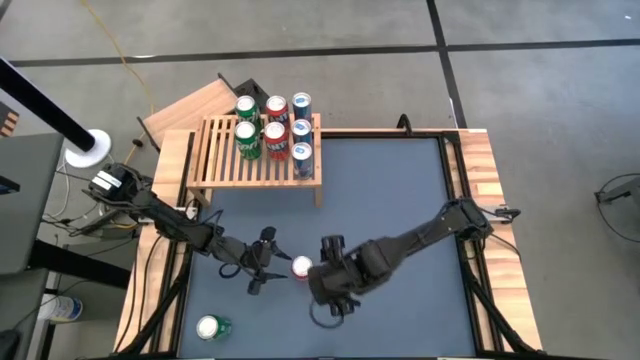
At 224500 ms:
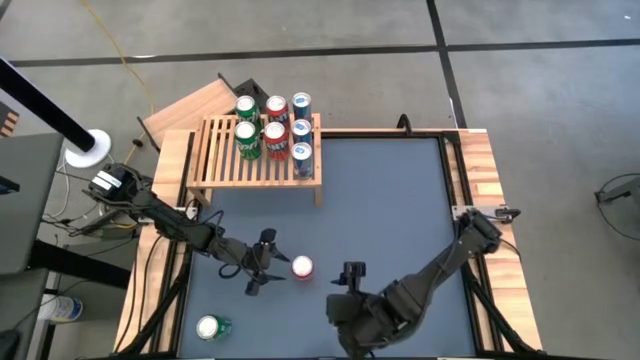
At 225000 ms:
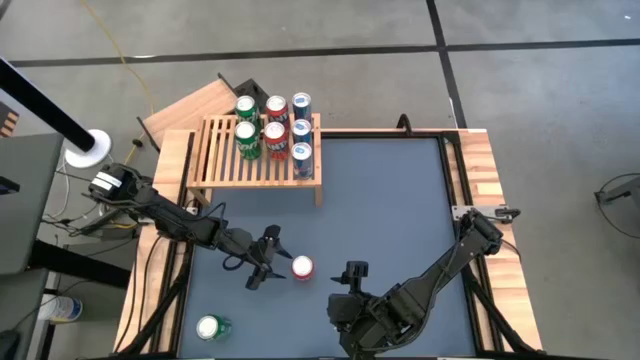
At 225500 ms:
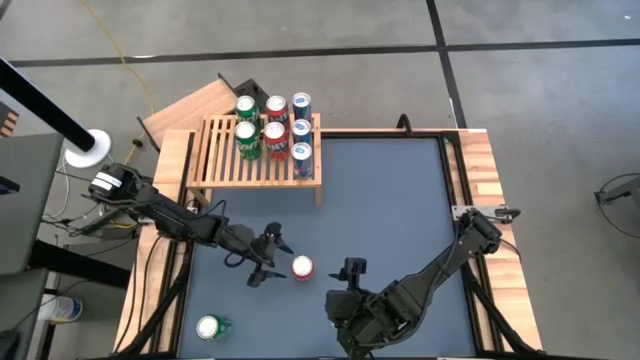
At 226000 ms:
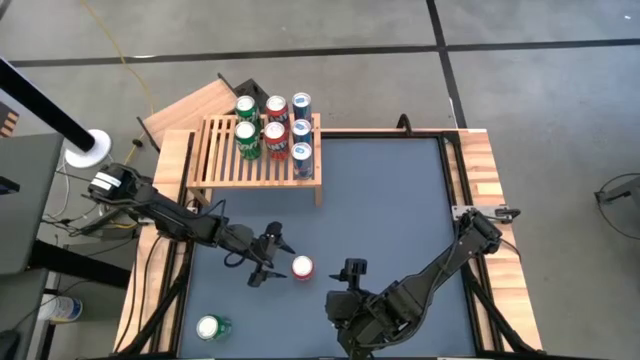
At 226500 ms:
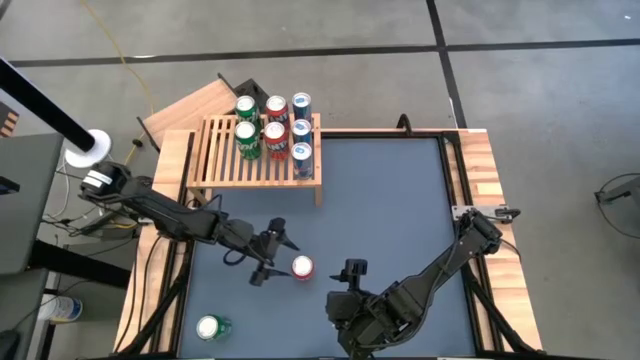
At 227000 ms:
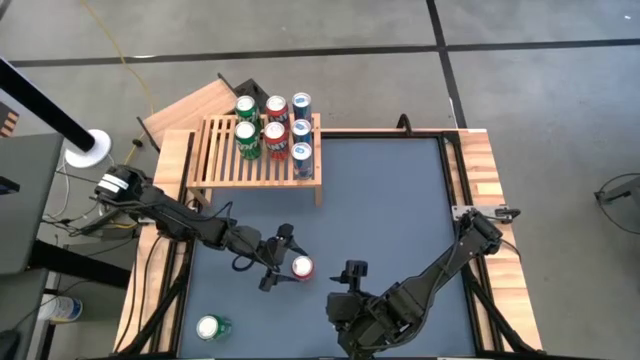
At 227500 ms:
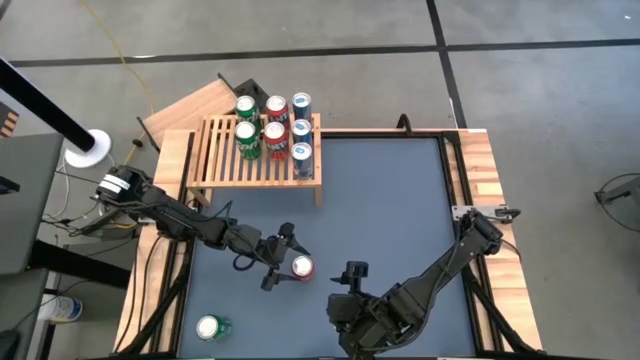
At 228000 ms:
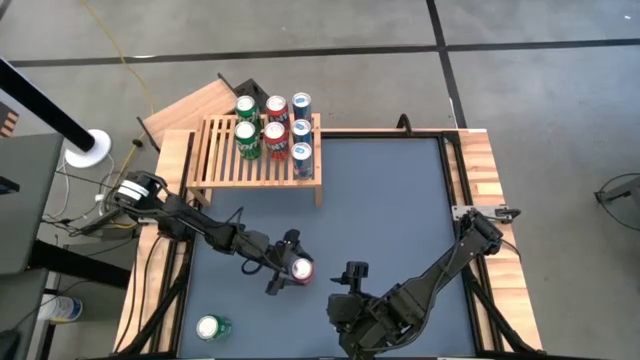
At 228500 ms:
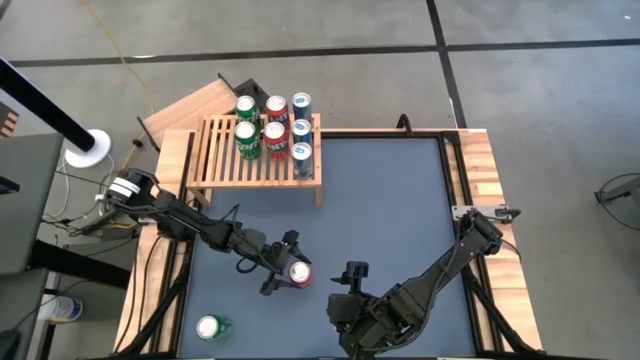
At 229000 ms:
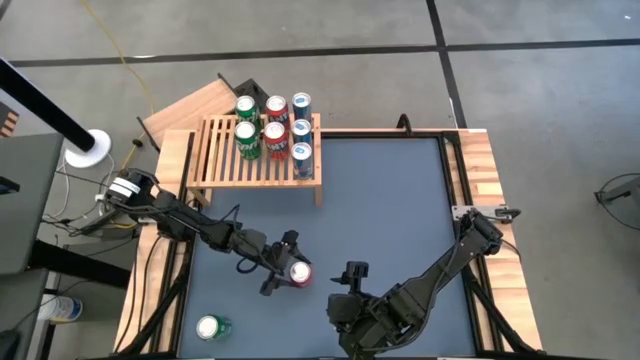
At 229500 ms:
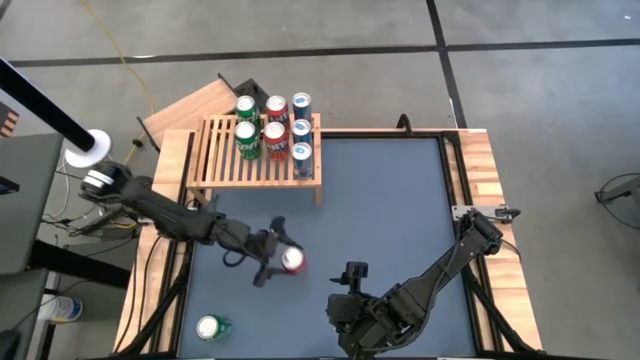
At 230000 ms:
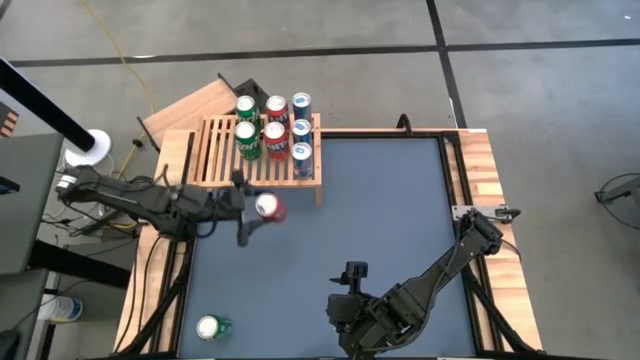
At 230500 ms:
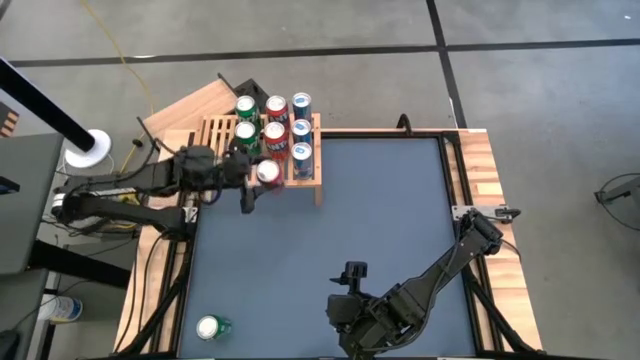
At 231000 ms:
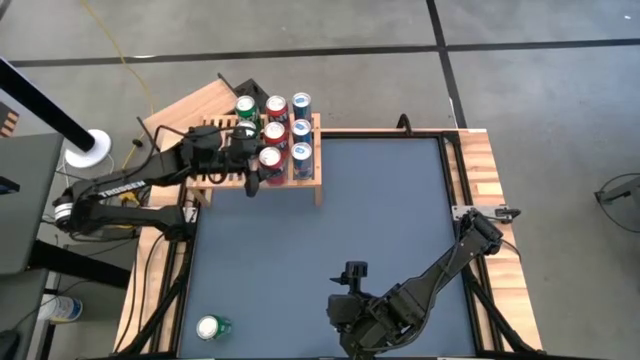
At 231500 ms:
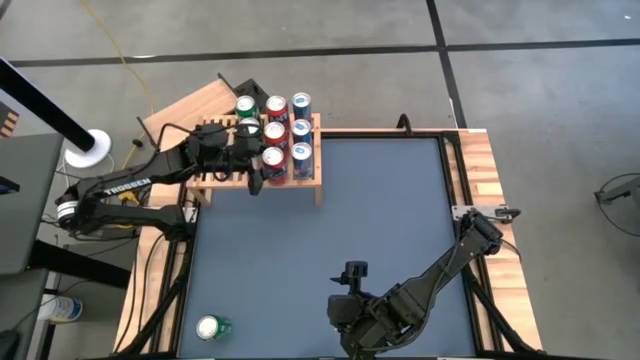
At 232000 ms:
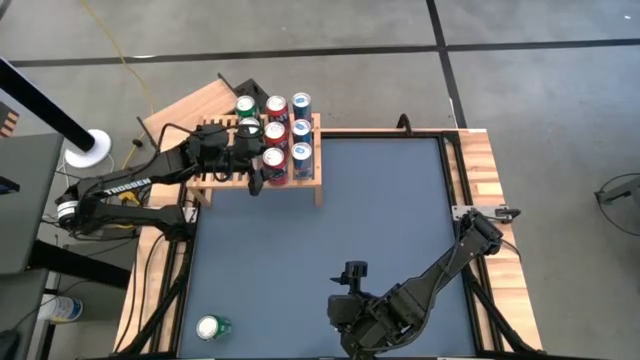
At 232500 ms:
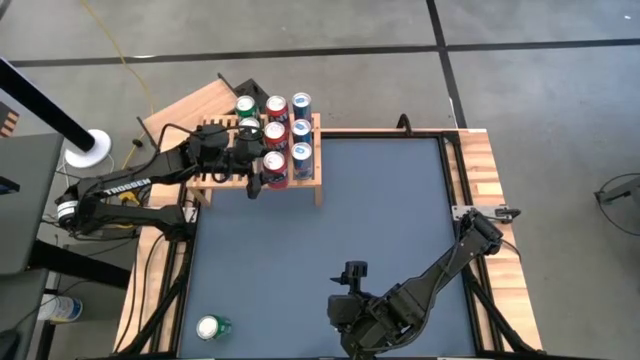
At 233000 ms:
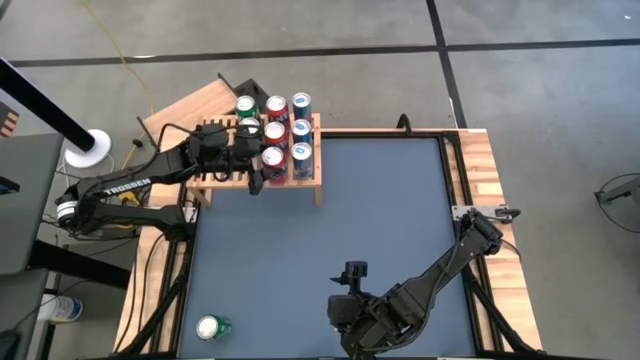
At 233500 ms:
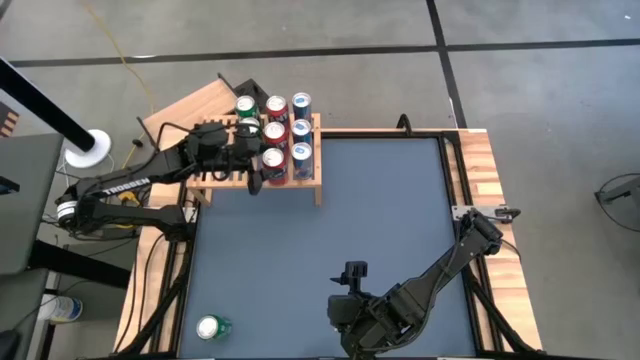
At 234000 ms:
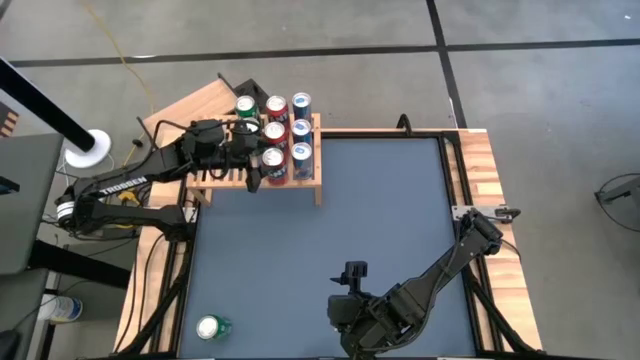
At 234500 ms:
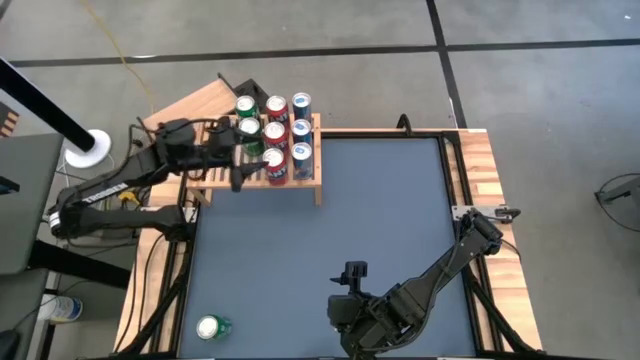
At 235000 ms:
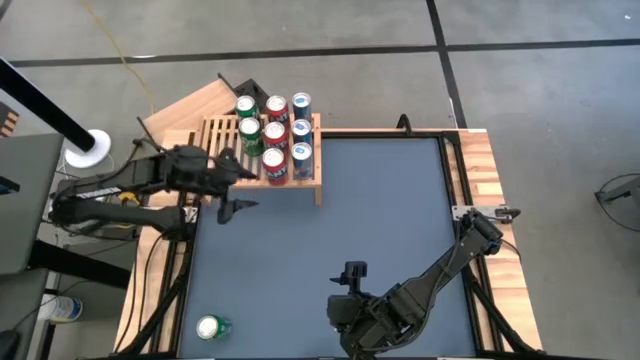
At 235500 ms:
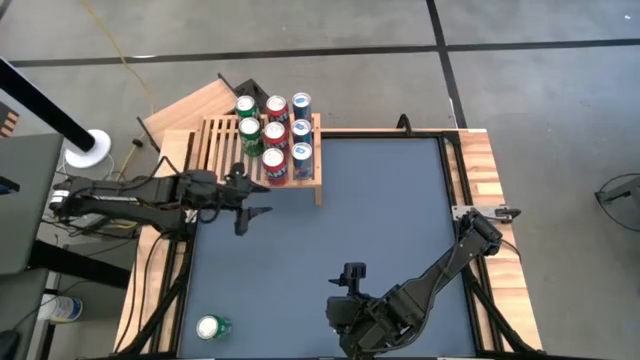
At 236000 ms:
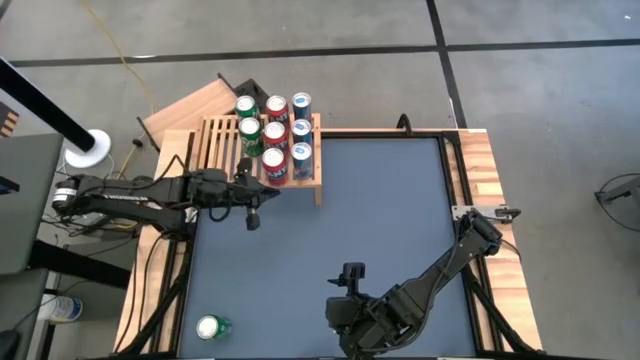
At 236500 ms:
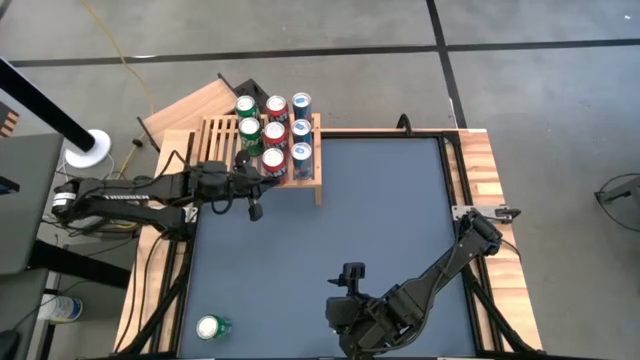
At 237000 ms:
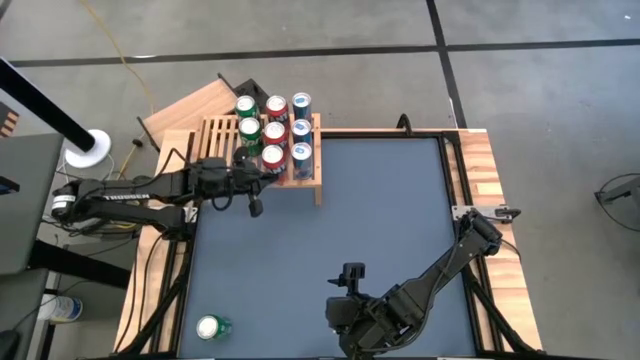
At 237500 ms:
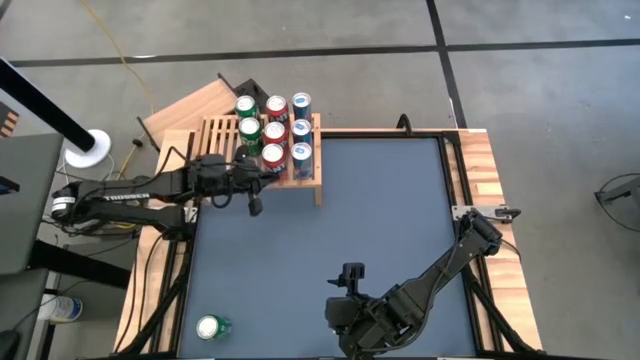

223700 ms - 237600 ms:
Task: Place canned beverage on shelf
Put the red soda can on the shelf aligned with the other red soda cans

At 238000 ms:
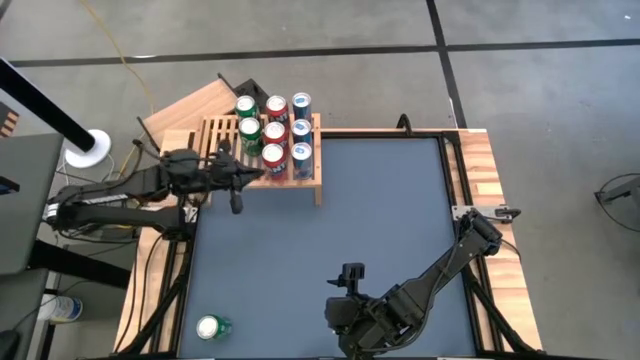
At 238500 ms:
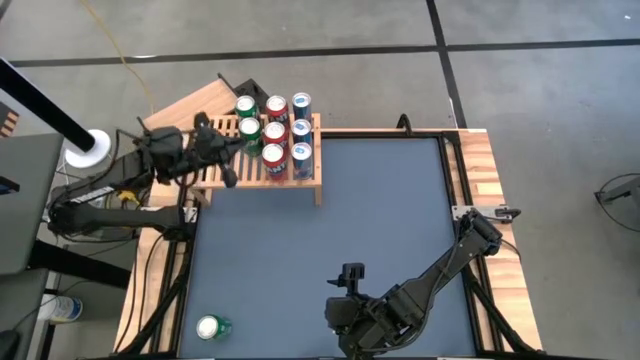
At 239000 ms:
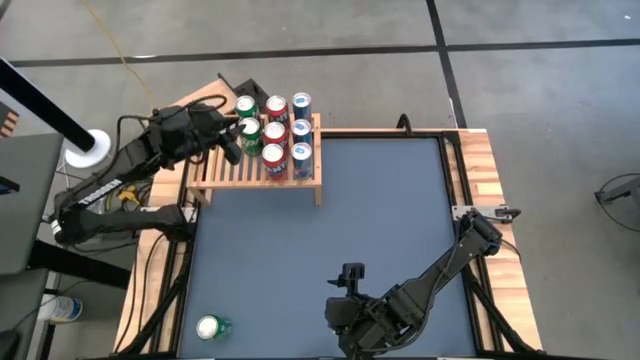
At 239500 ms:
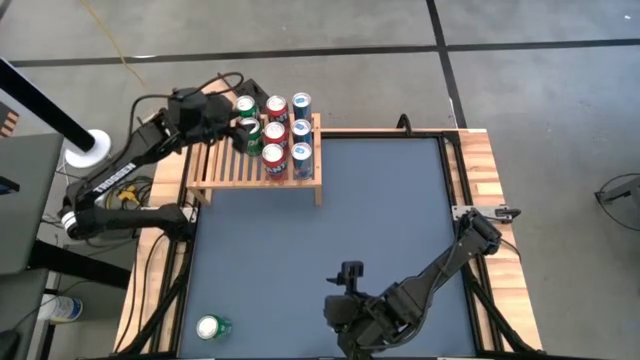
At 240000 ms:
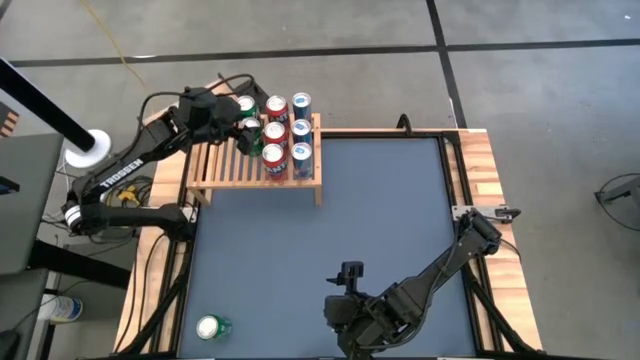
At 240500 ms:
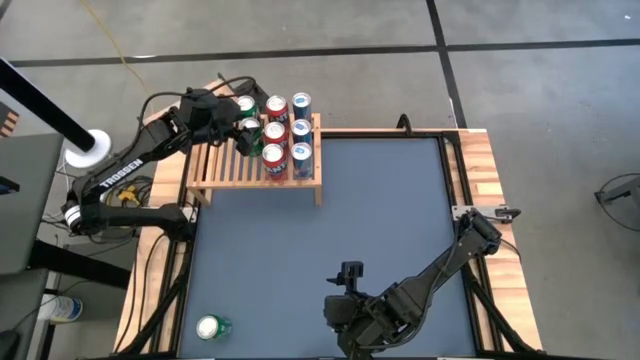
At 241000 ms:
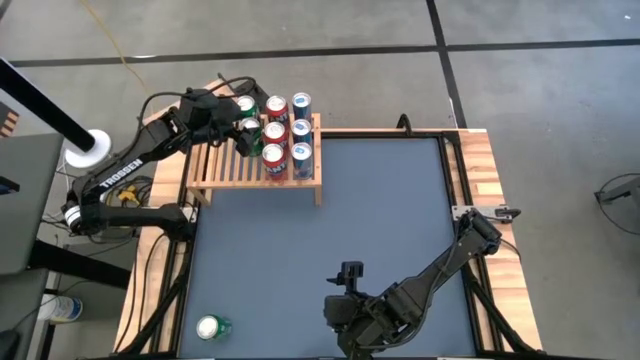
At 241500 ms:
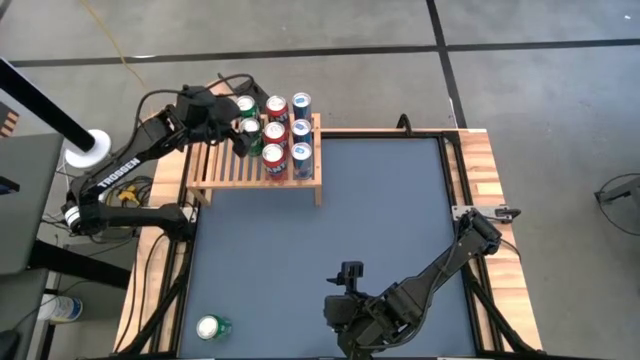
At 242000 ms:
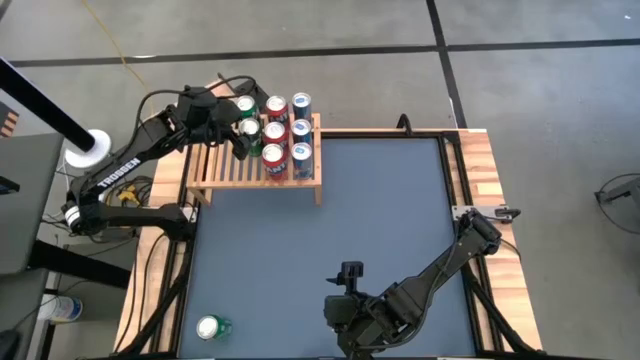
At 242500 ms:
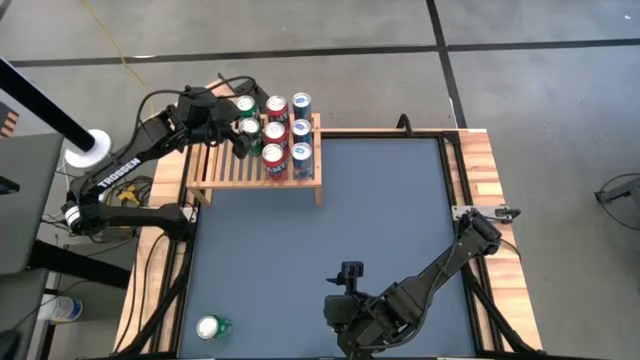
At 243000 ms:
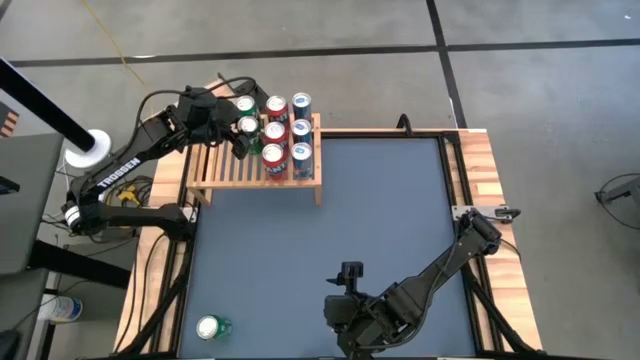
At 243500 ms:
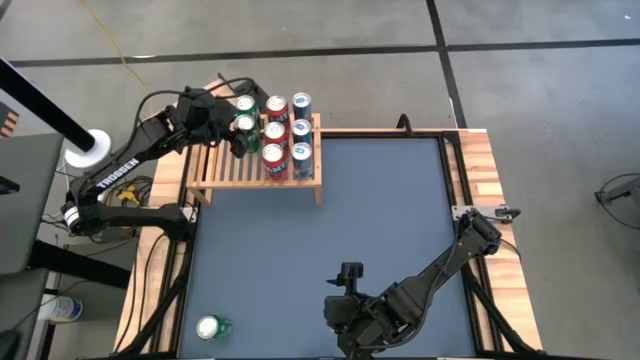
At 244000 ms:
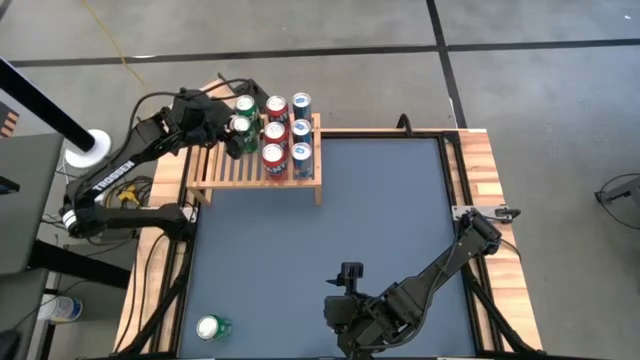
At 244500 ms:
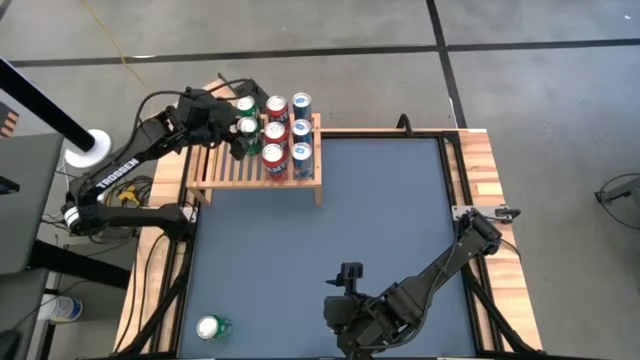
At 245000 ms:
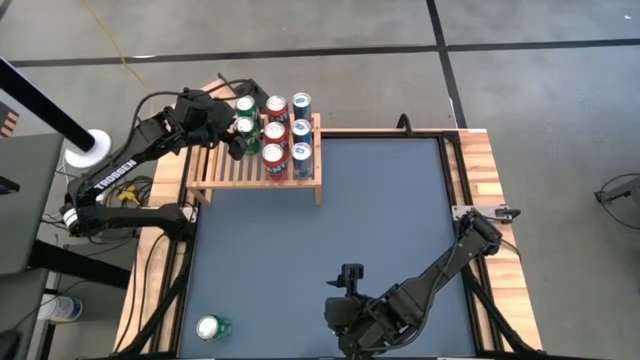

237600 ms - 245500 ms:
Adjust the green soda can on the shelf
